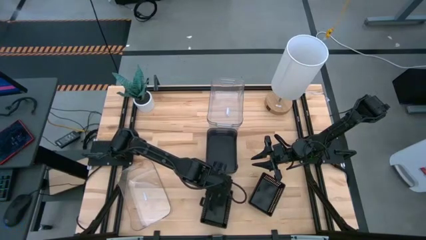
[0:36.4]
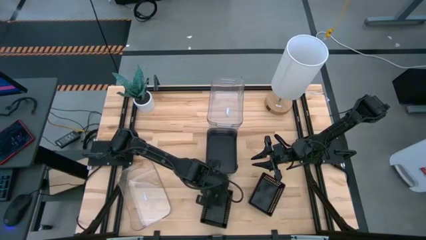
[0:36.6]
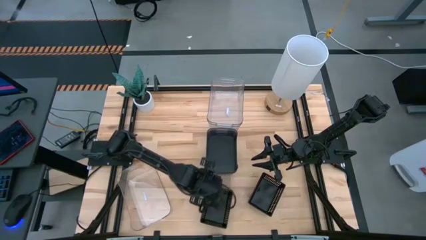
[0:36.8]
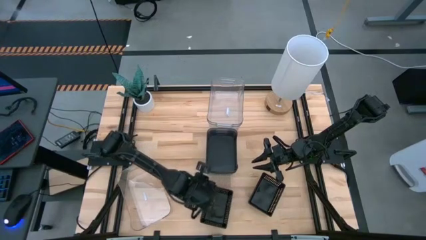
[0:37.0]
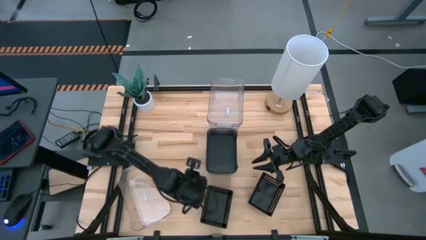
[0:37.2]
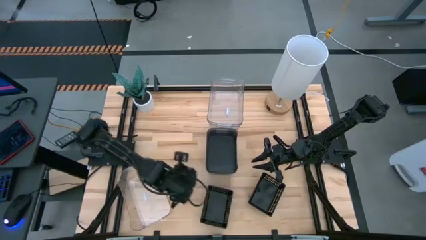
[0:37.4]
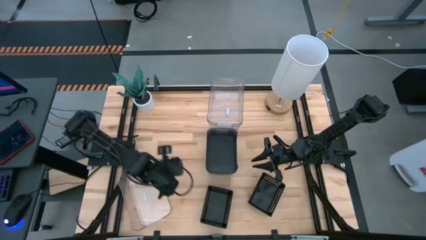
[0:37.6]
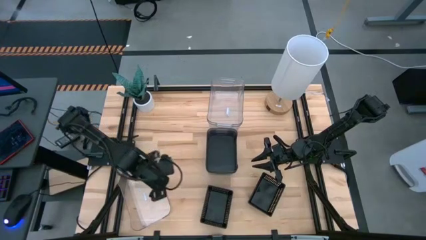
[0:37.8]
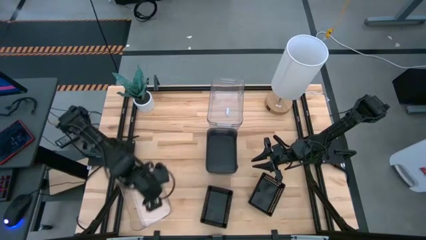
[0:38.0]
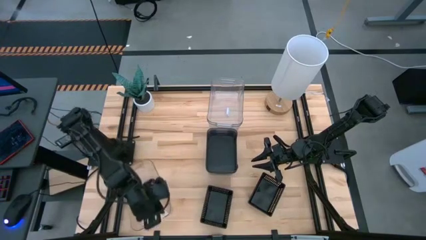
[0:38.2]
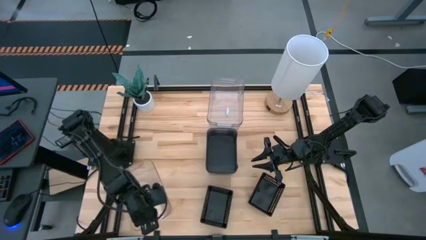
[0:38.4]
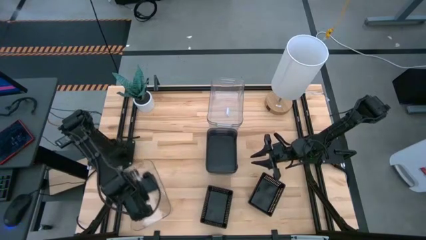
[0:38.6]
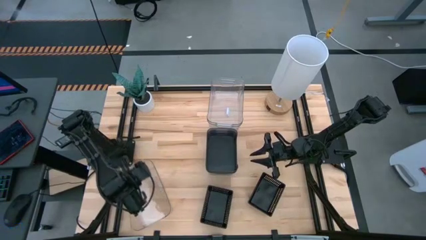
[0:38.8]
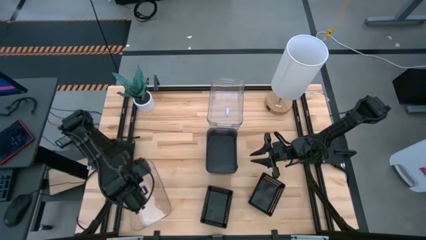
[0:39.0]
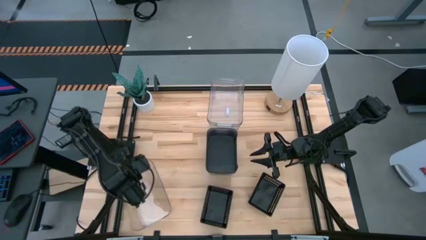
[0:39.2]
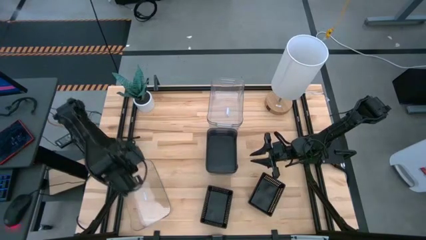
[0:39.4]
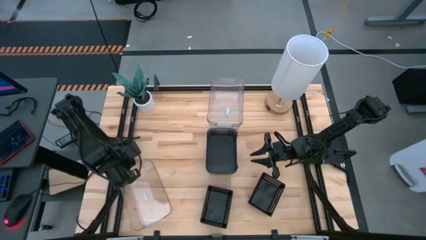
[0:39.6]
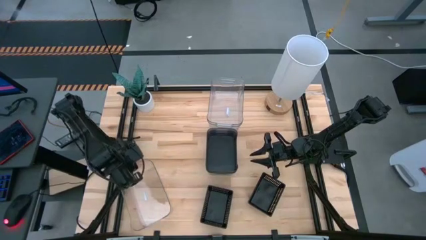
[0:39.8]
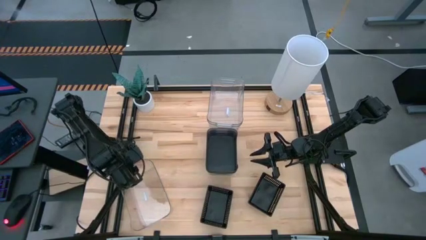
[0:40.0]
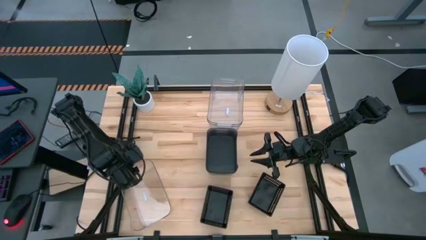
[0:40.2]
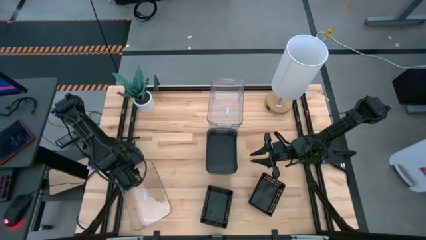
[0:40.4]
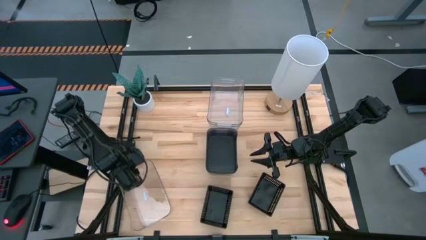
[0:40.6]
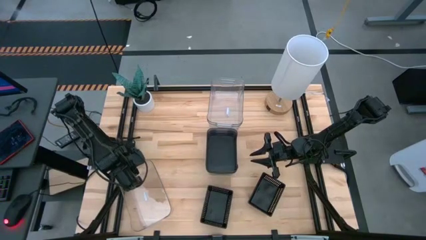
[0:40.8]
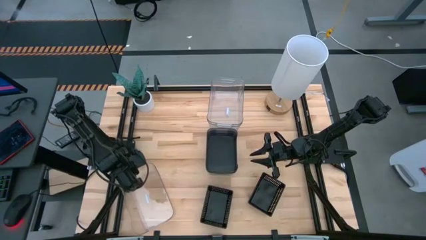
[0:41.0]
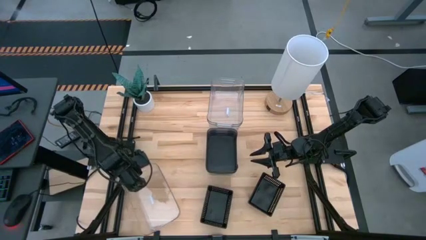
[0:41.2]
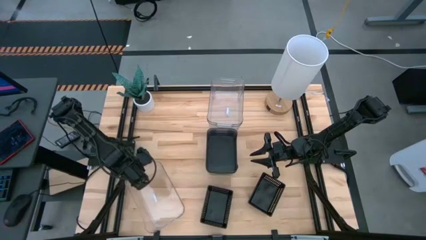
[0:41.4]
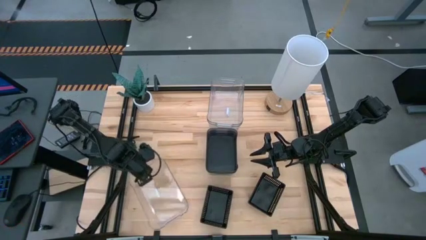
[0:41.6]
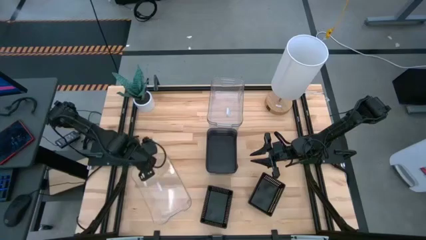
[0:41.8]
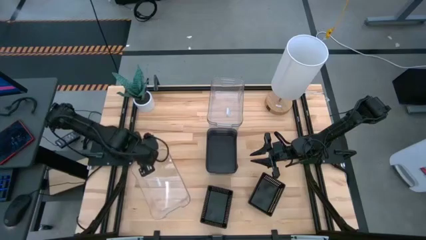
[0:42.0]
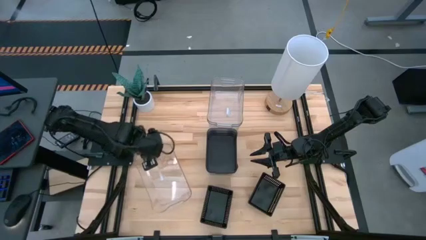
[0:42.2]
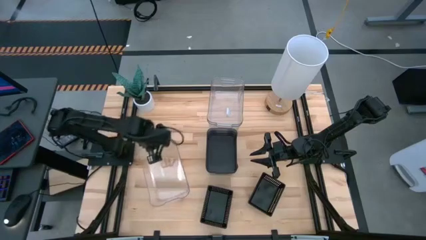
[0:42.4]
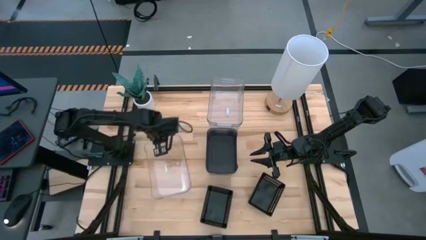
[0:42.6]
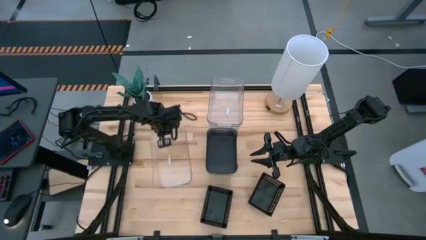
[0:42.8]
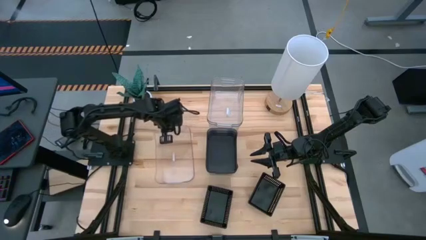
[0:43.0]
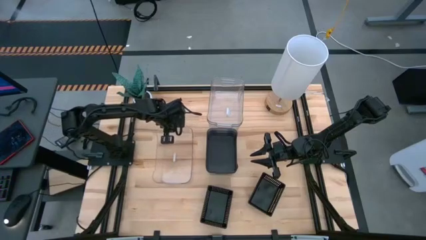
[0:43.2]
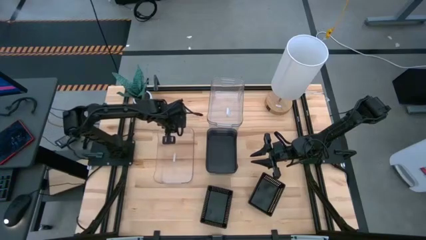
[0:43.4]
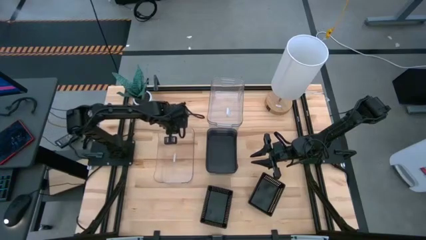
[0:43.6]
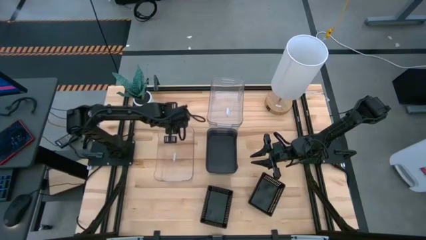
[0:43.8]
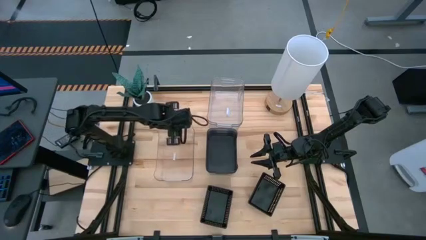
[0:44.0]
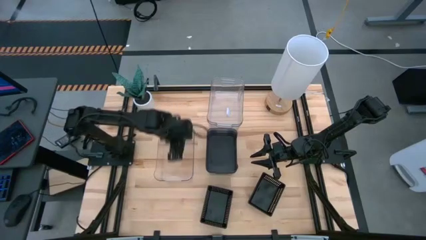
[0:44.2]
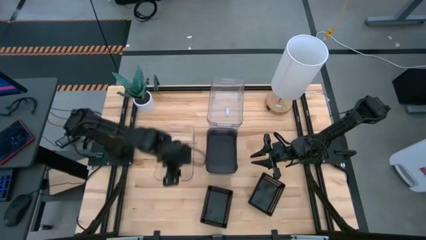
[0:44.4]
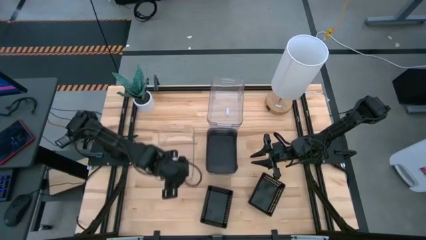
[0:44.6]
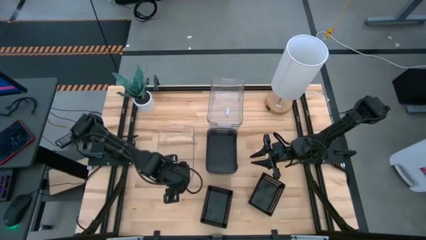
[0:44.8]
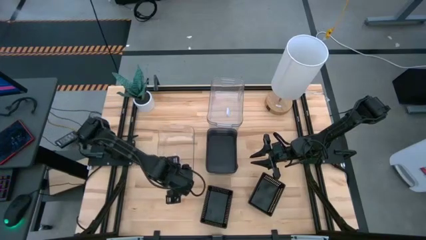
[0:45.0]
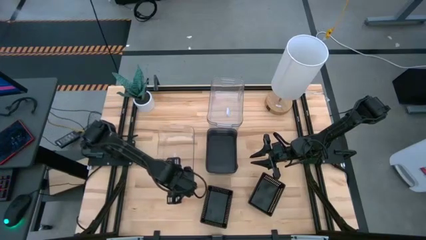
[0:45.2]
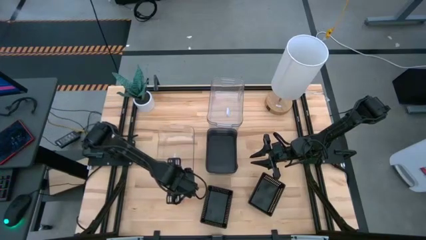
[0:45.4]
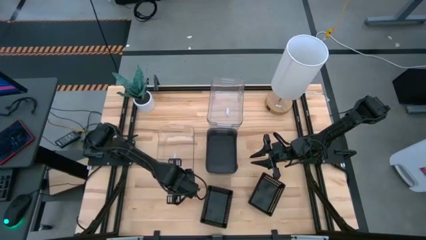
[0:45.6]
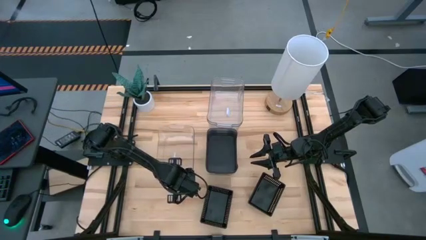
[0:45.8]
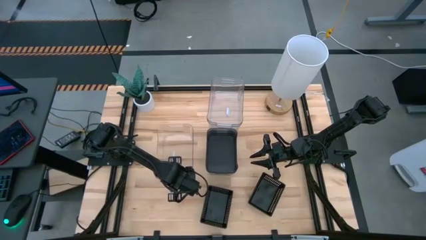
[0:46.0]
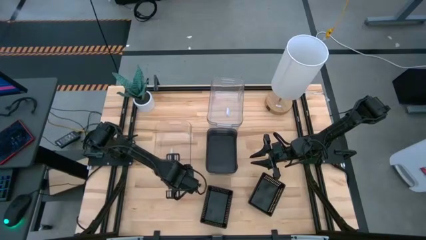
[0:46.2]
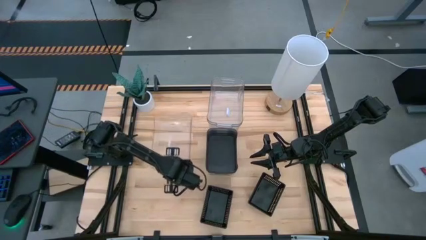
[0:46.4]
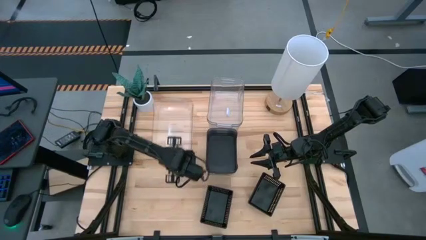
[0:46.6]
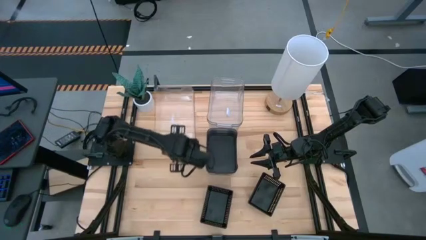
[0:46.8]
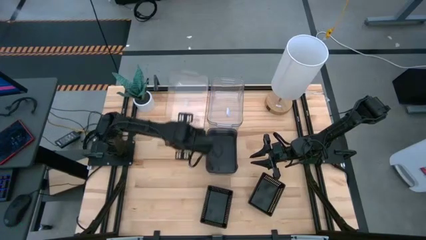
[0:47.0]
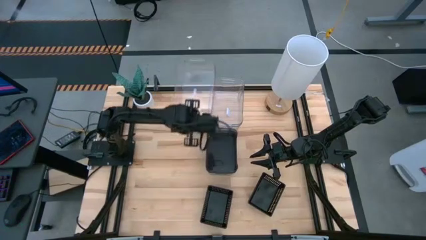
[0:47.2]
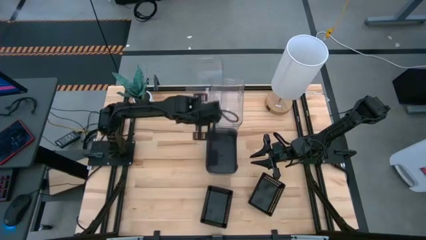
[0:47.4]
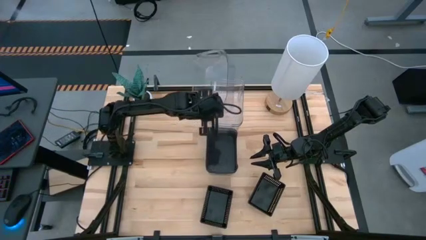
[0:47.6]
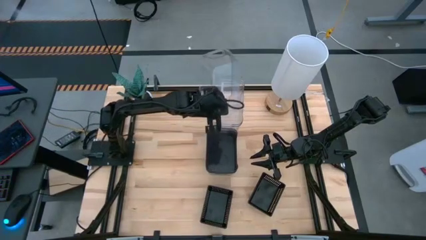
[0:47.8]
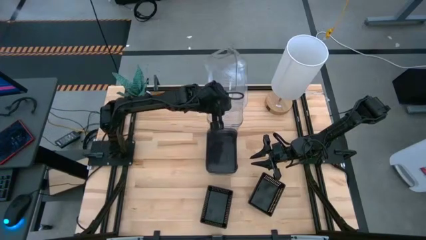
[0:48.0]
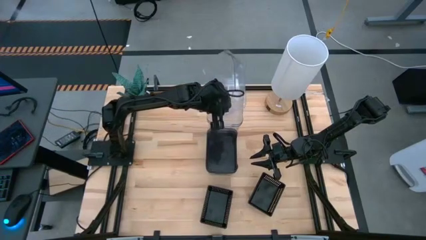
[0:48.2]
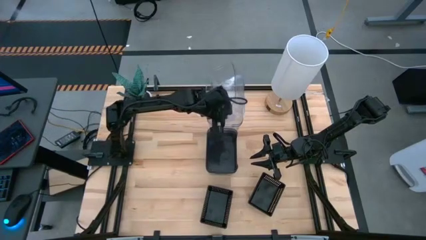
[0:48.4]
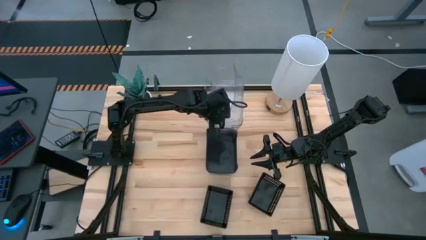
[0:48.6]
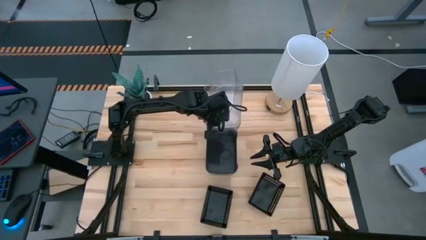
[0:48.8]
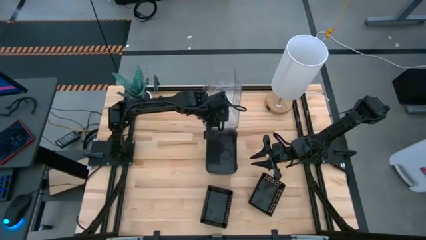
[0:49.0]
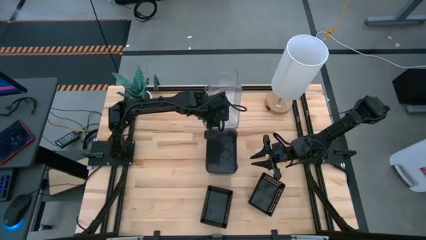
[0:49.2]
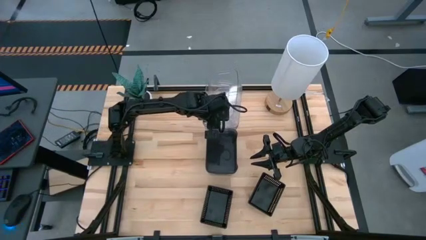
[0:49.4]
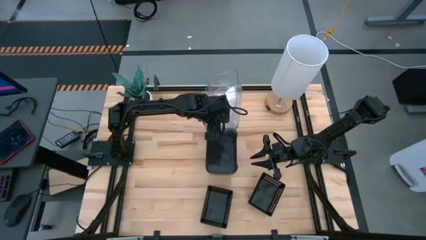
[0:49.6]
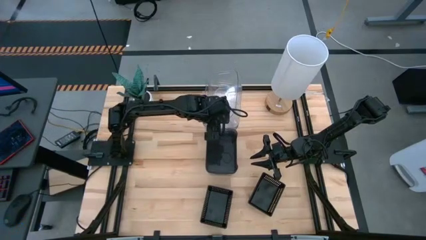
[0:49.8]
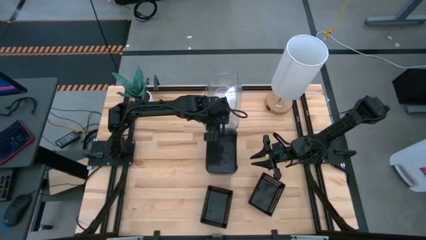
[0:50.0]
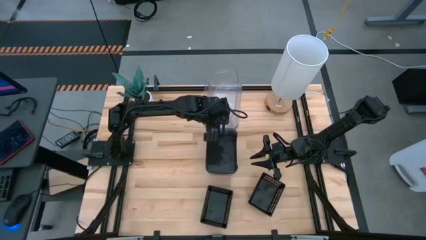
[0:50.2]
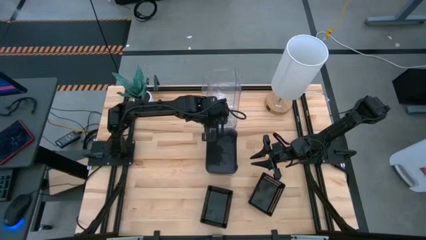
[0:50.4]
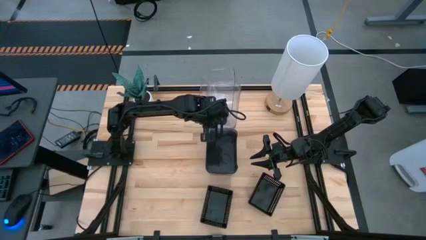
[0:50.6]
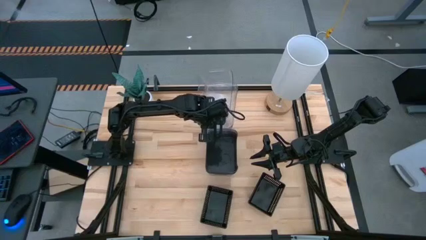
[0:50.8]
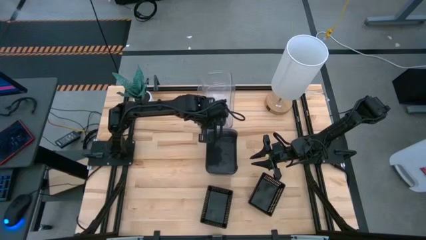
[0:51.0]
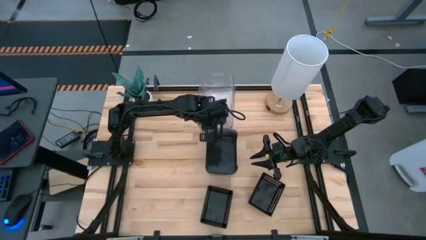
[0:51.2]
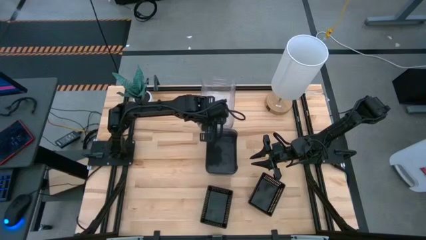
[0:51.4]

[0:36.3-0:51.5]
Stack the bottom transparent bin on top of the transparent bin
